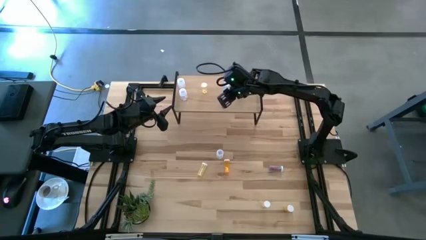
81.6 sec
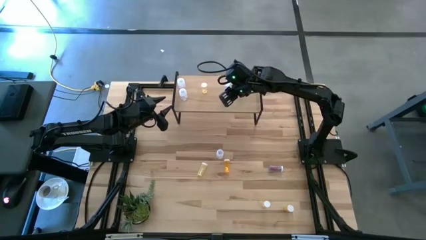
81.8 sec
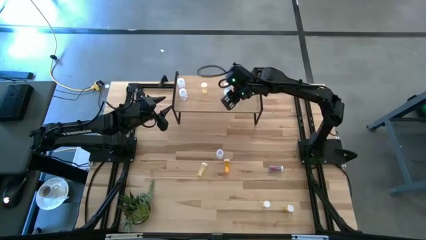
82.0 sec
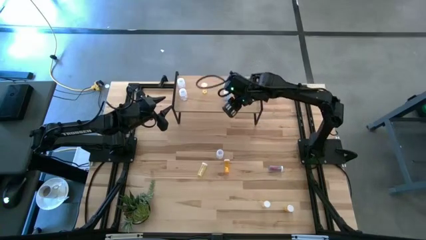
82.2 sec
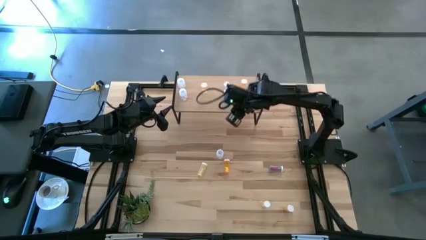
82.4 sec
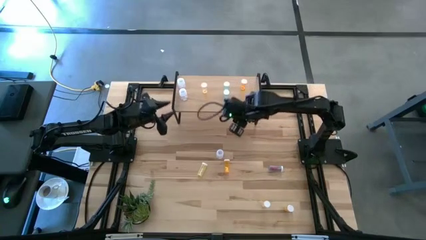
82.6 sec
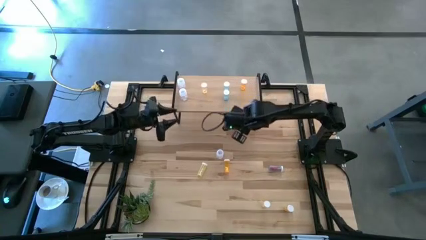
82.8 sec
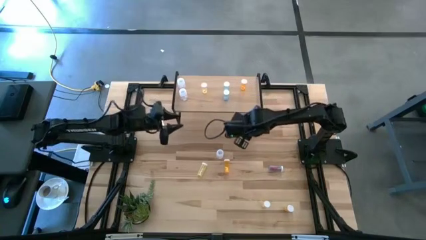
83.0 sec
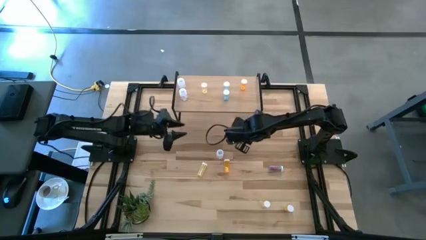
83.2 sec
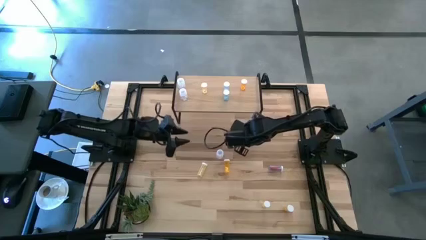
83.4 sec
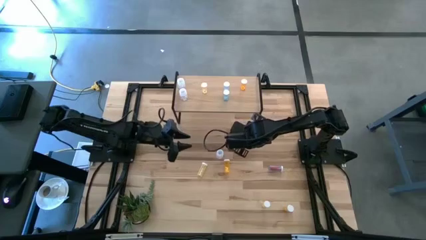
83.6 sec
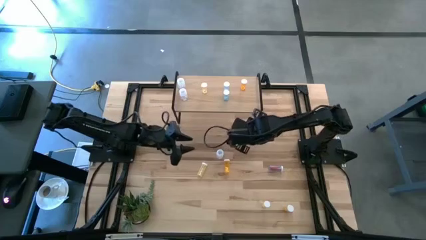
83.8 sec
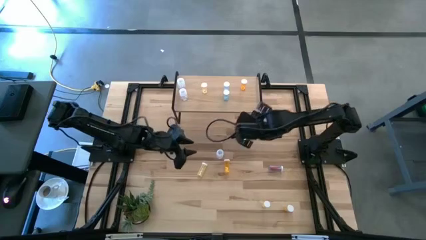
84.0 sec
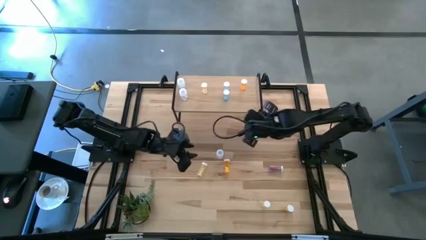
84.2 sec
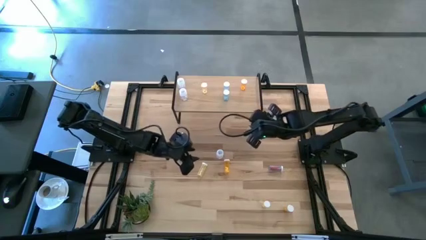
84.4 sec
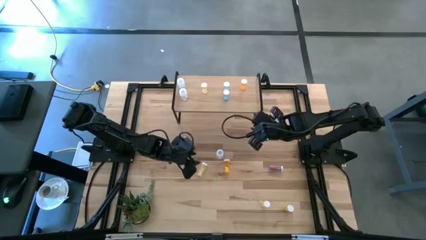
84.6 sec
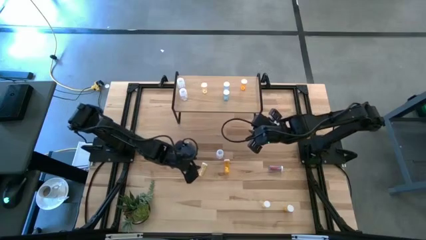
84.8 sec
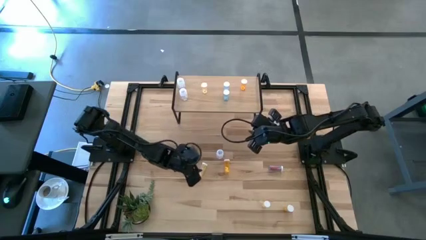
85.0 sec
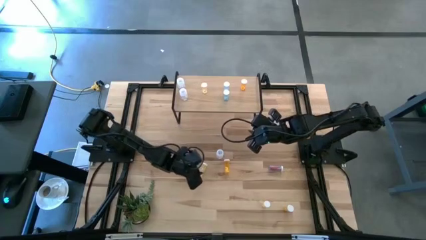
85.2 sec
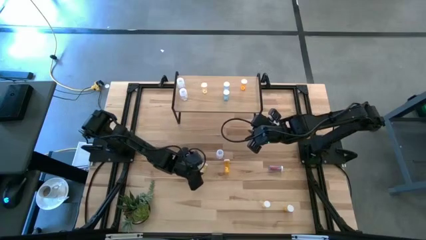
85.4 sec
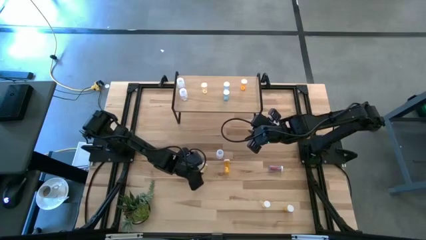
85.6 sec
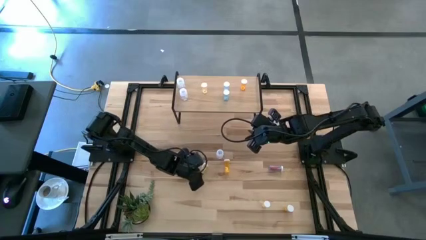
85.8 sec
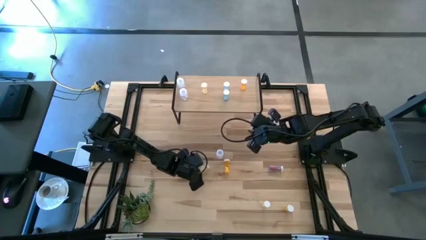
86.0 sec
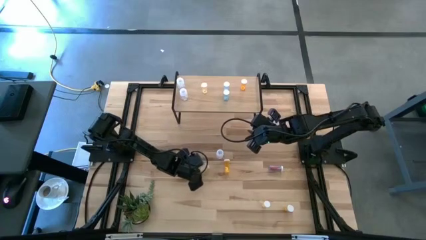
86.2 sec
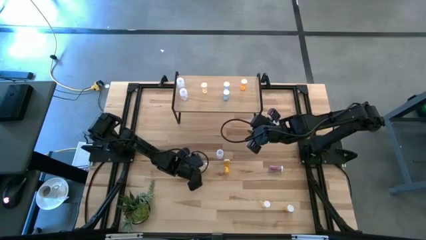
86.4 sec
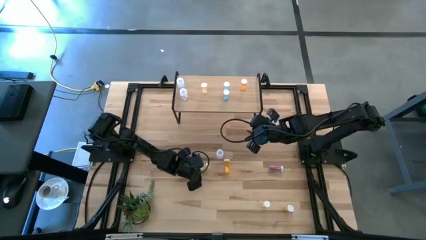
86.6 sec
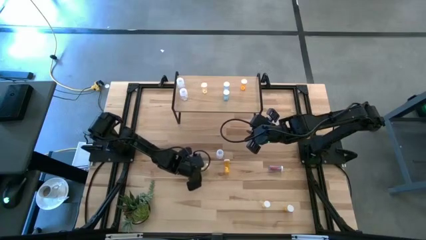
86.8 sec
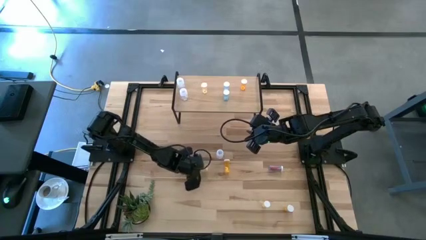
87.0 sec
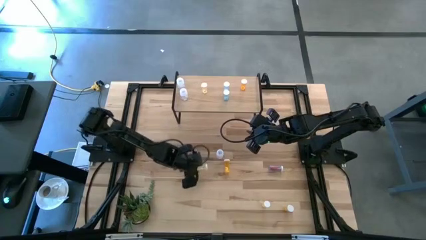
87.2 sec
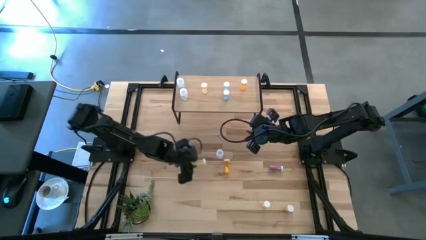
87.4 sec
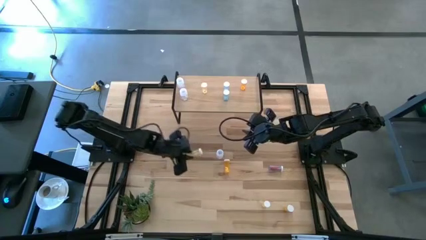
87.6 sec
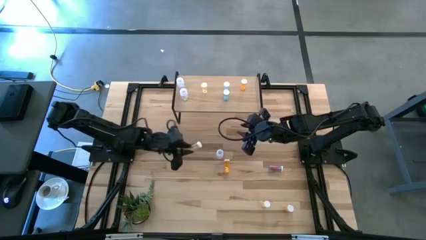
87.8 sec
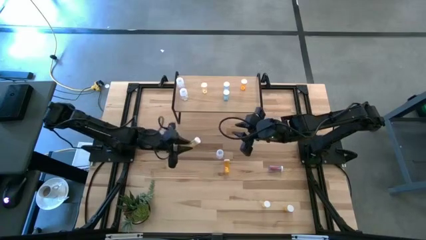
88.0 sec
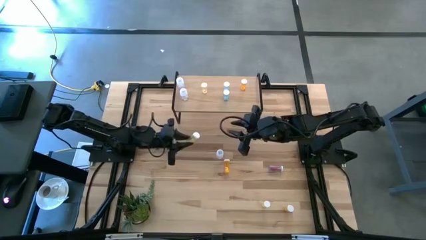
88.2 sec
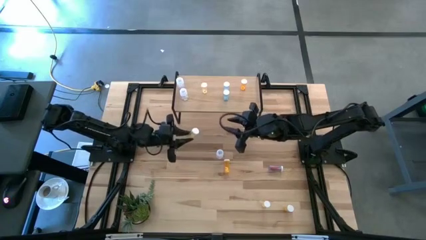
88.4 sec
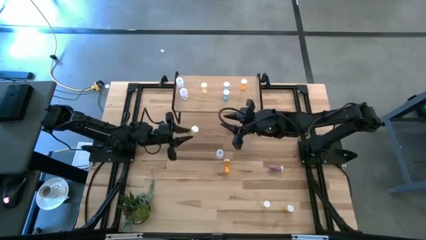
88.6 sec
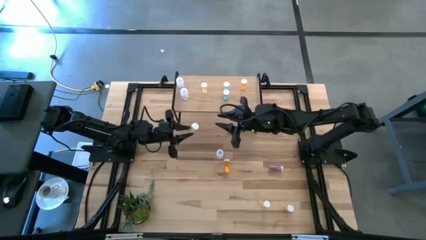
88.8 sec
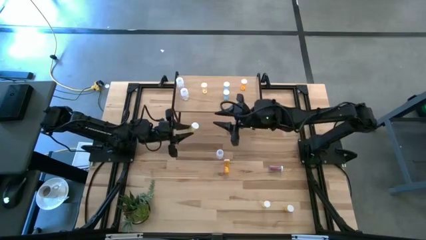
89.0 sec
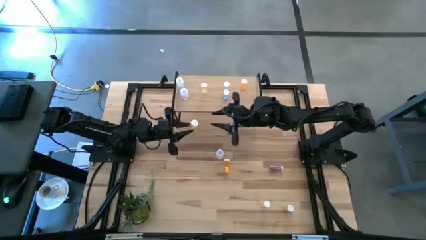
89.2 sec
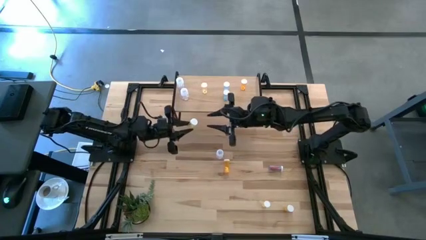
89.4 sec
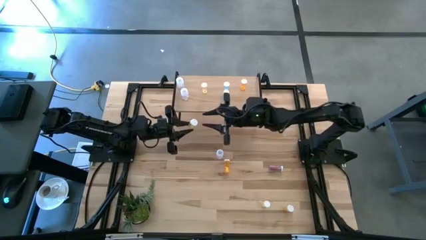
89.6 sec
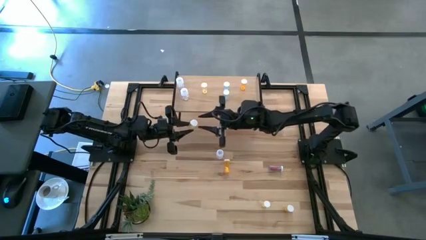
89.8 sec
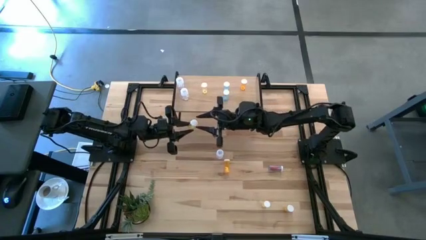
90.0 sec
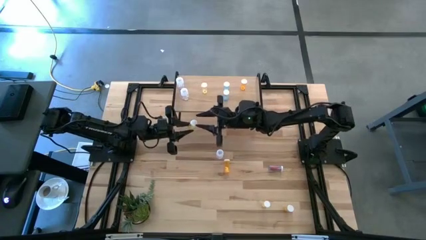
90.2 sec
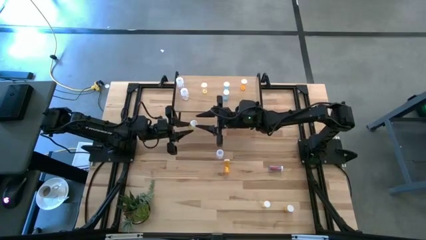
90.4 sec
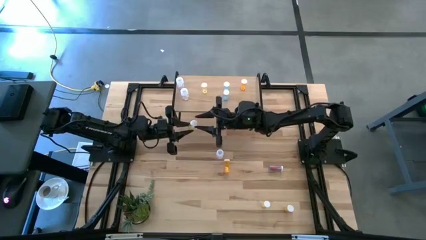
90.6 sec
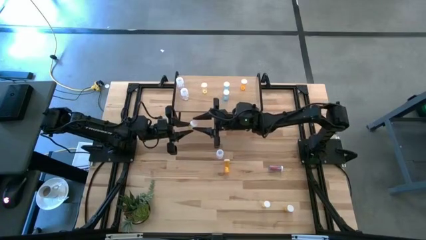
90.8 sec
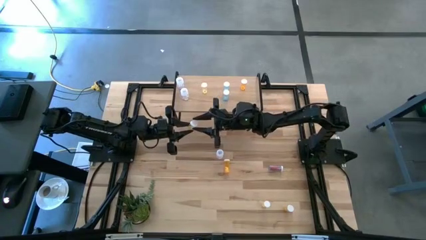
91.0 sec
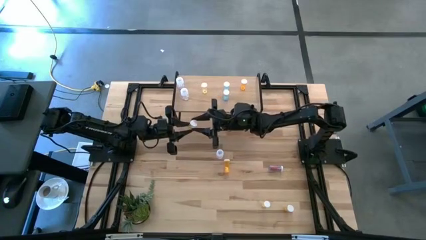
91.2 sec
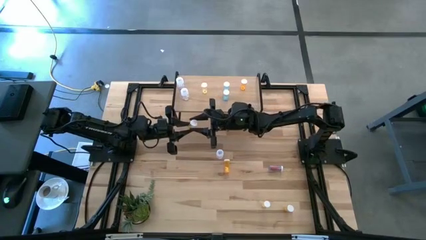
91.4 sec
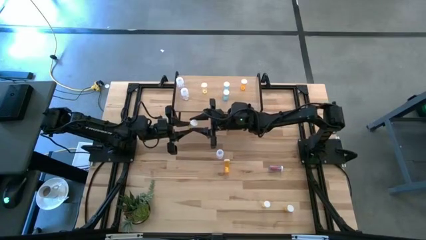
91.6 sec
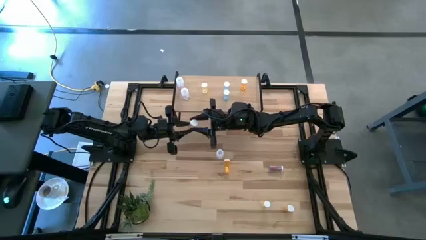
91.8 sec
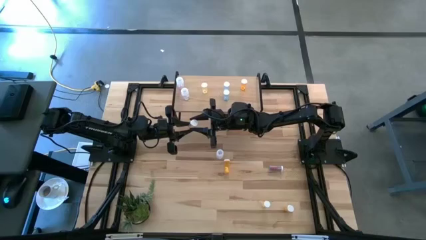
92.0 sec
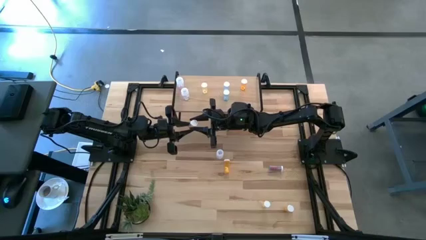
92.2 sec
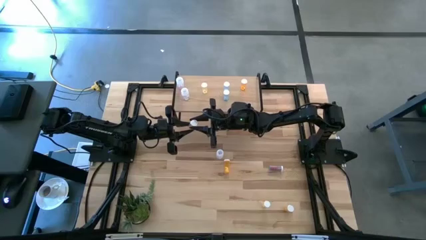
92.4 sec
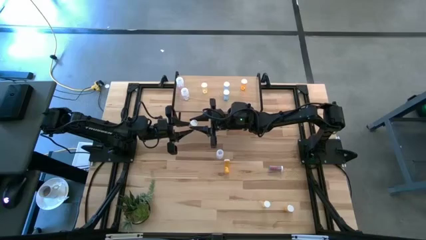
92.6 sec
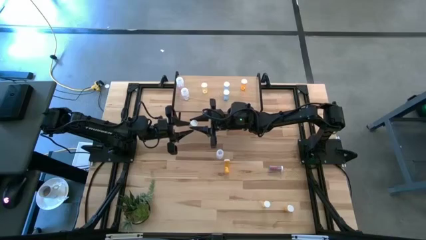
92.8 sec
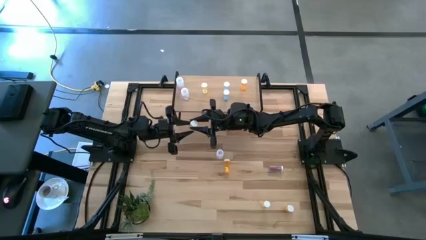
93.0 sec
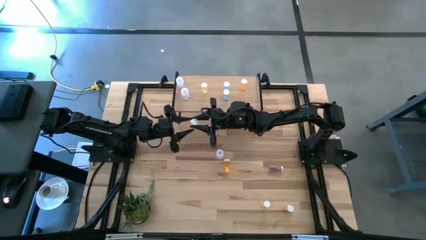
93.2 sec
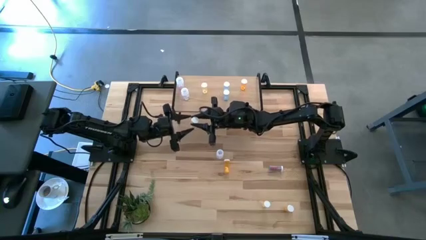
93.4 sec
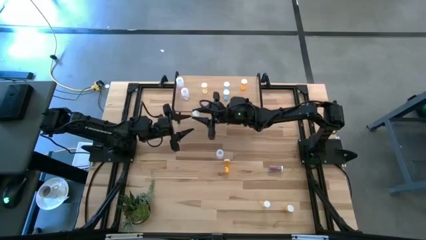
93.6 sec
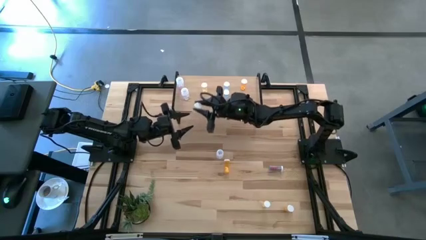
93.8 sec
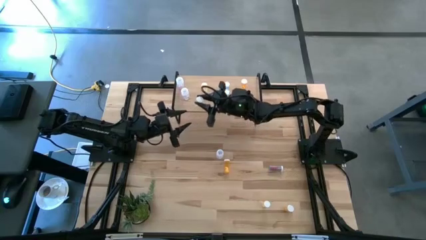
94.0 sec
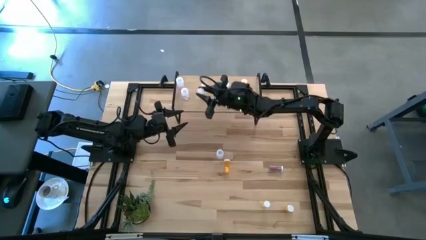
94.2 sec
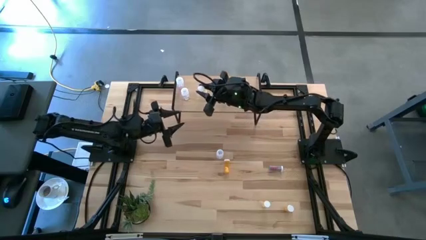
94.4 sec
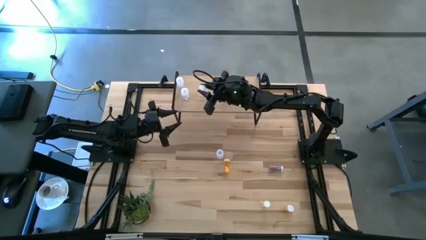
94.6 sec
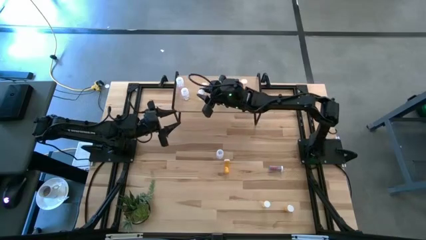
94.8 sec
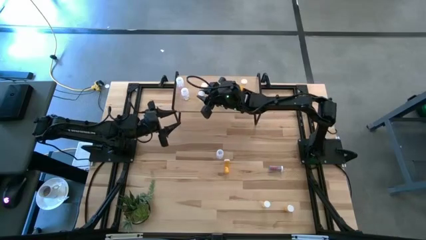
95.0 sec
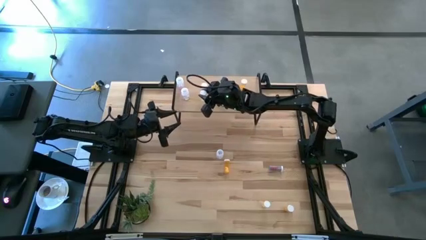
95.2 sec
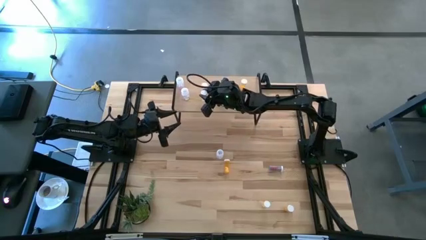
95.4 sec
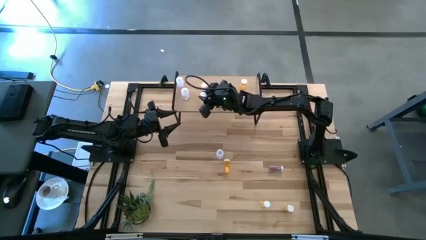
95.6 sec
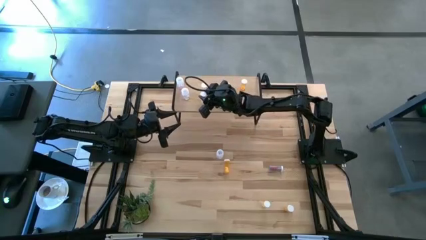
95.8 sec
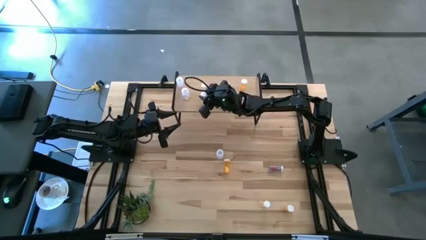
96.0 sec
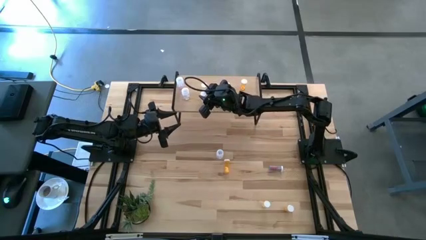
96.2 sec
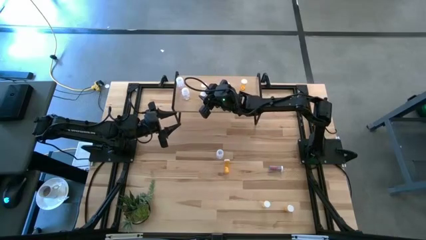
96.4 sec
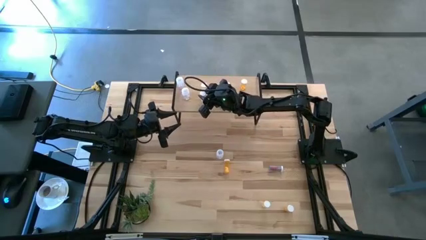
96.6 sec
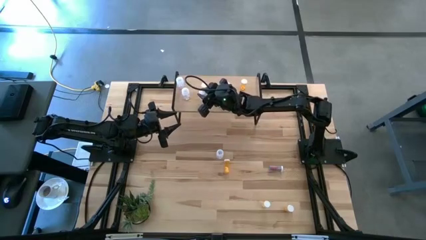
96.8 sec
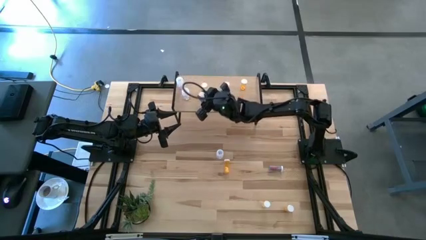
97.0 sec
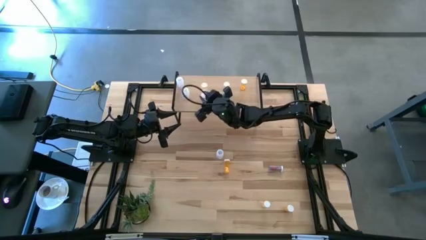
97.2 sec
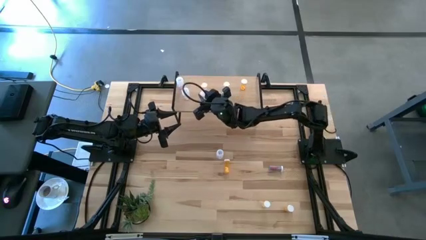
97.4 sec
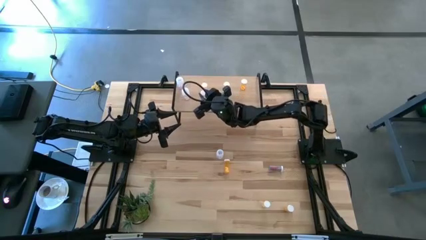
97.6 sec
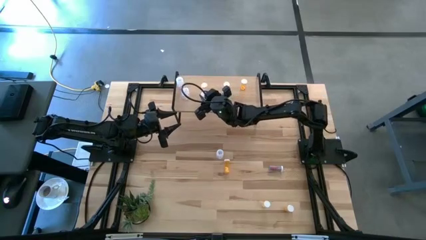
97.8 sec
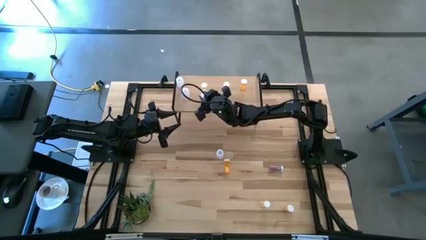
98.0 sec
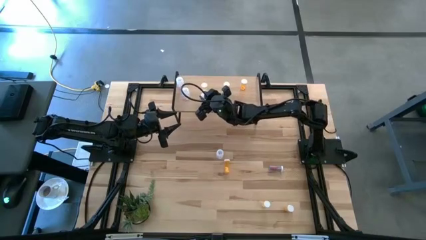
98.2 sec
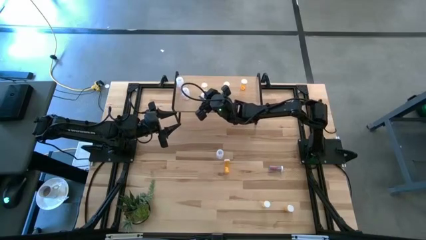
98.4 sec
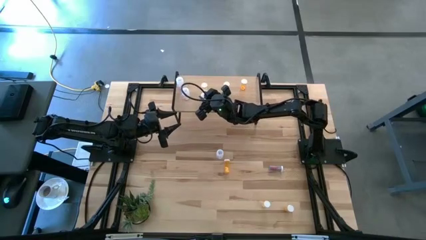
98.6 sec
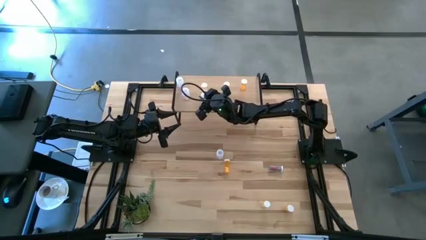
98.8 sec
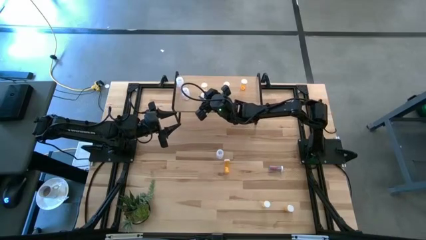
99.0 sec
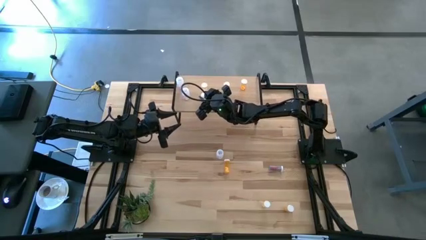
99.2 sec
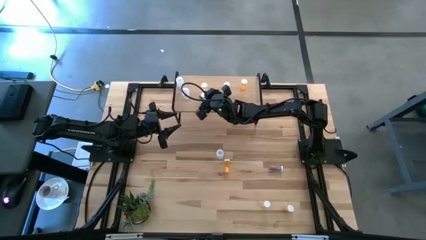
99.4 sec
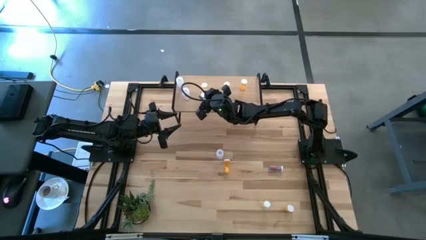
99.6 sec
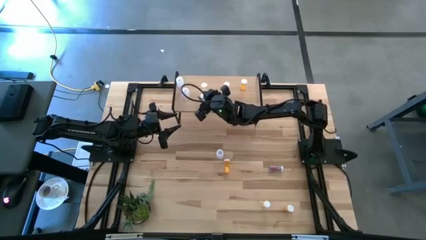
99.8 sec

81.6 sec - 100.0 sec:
Task: Pick and place medicine bottles onto shelf by color
Put the top yellow pill bottle on the shelf aligned with the other yellow pill bottle
